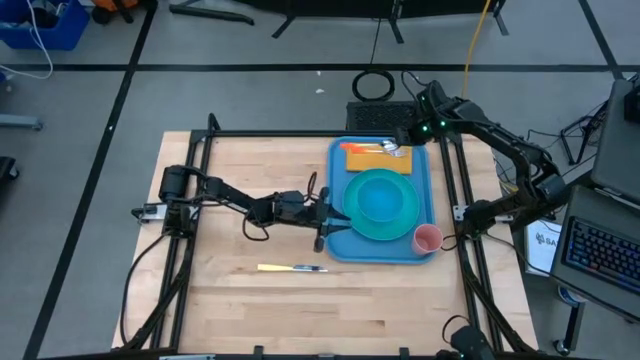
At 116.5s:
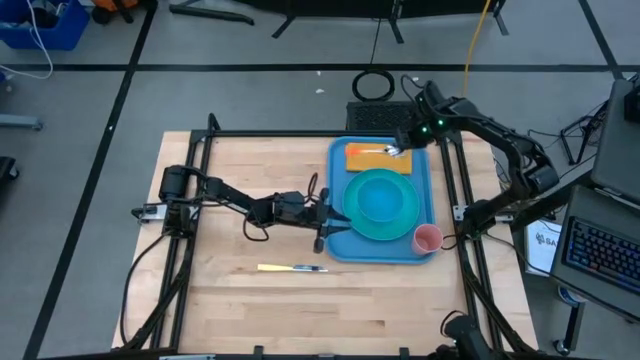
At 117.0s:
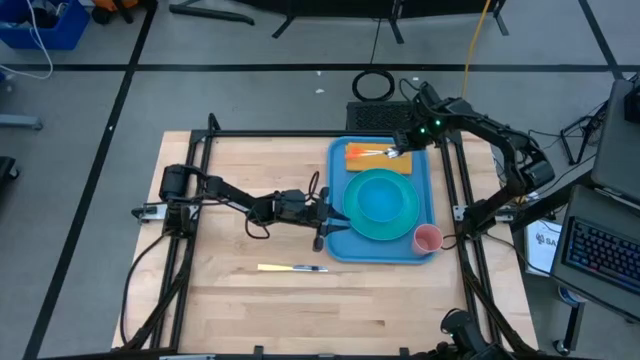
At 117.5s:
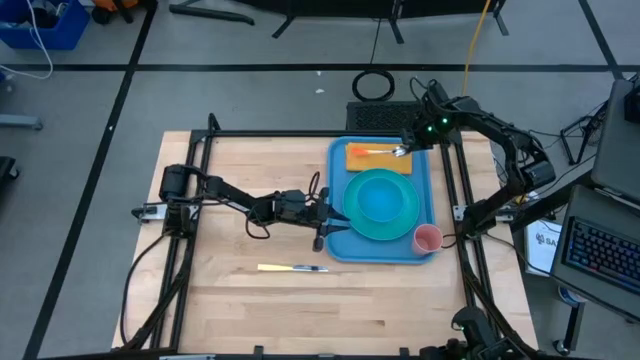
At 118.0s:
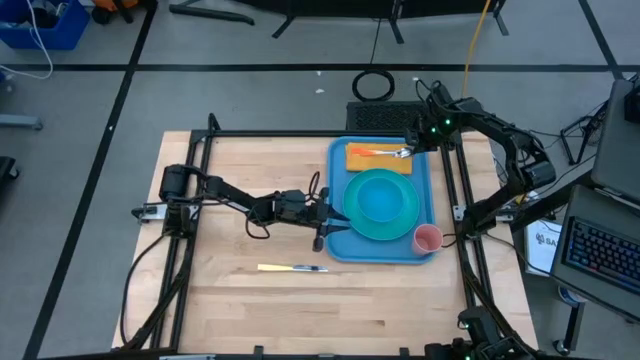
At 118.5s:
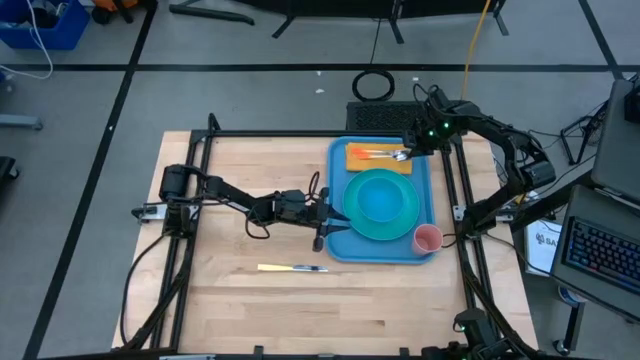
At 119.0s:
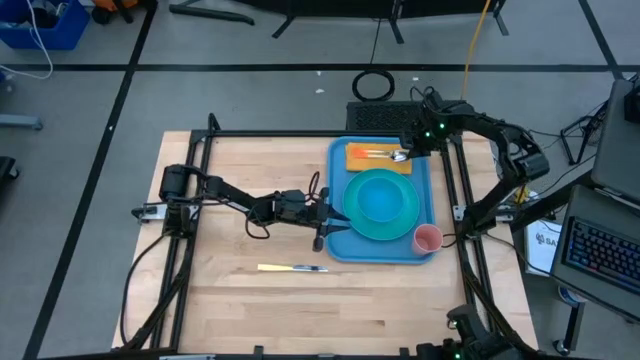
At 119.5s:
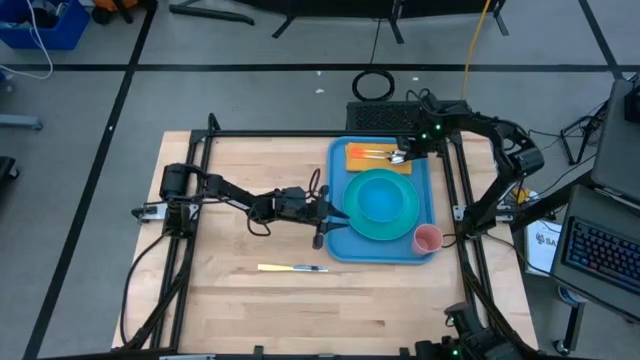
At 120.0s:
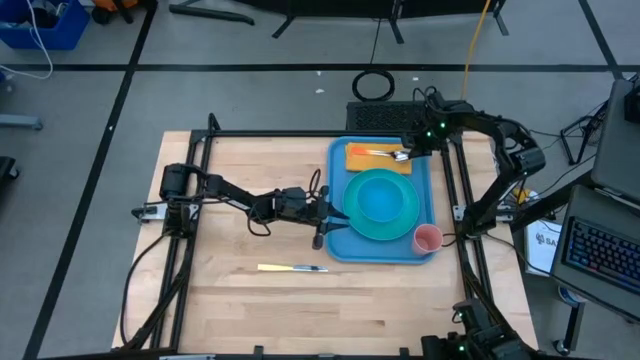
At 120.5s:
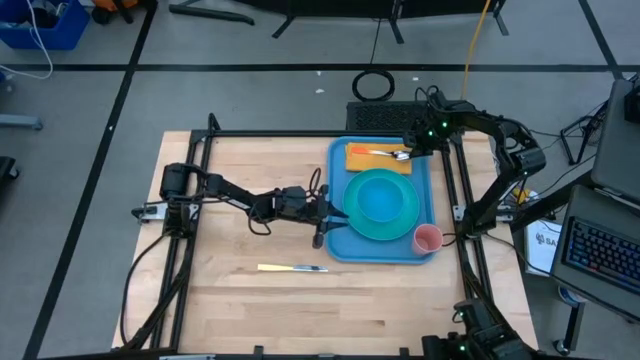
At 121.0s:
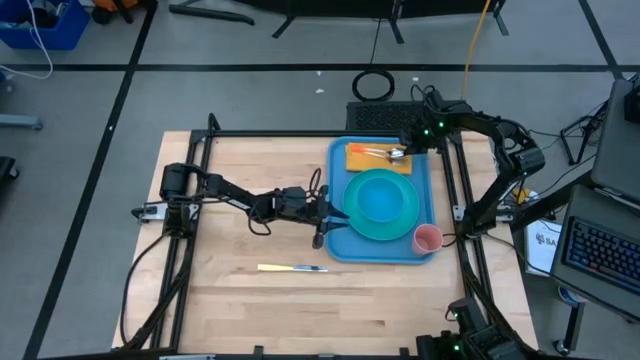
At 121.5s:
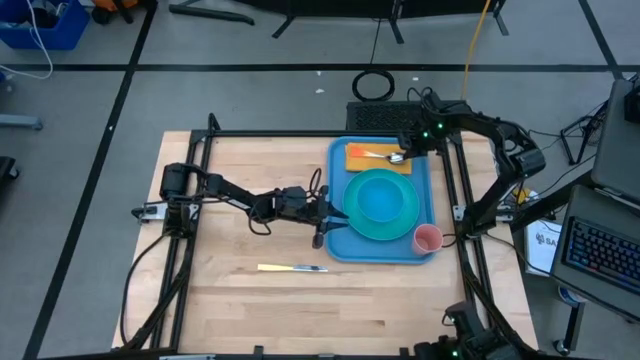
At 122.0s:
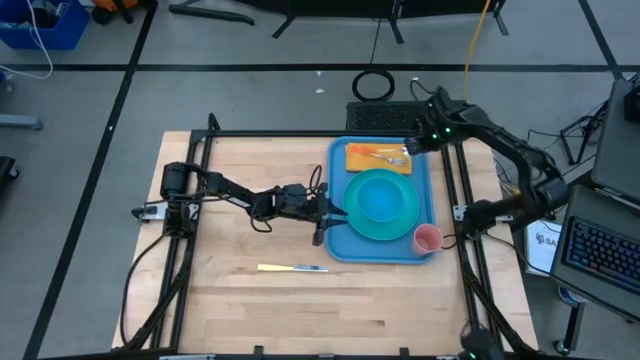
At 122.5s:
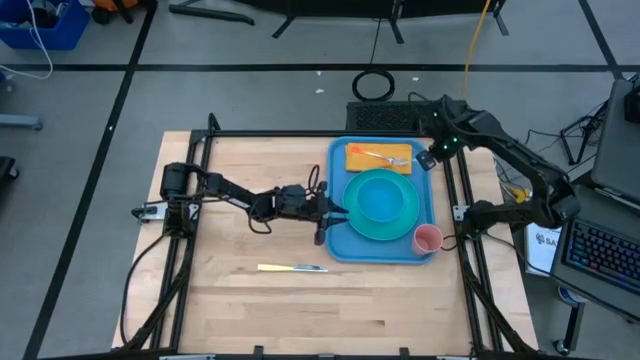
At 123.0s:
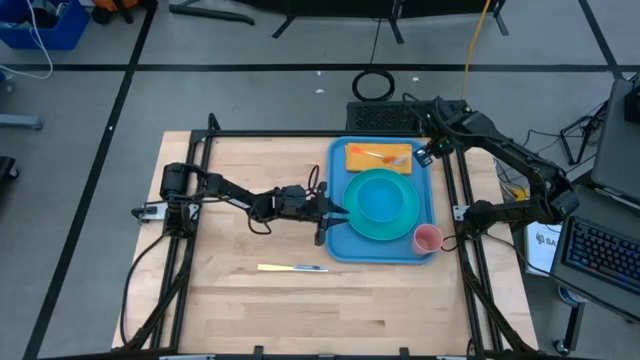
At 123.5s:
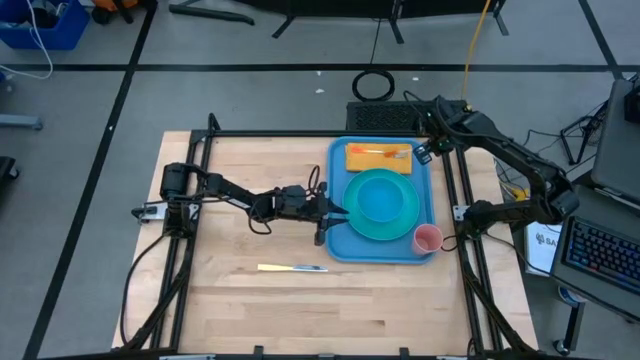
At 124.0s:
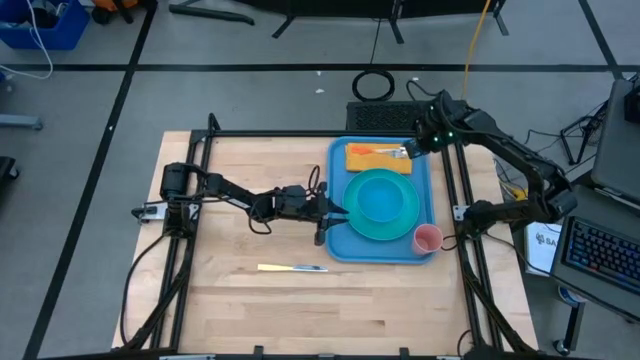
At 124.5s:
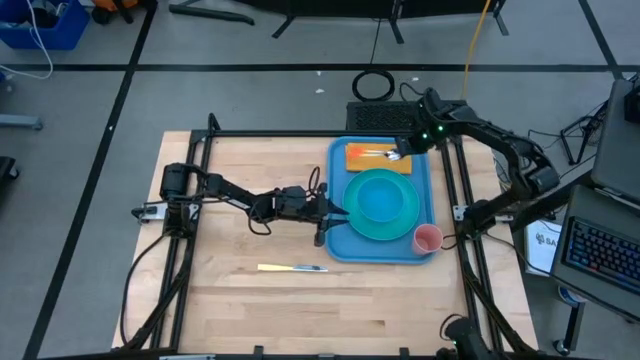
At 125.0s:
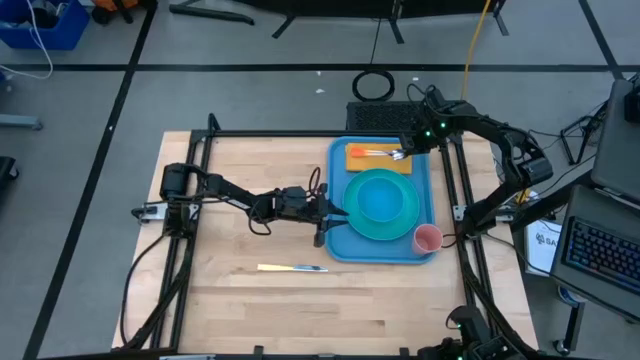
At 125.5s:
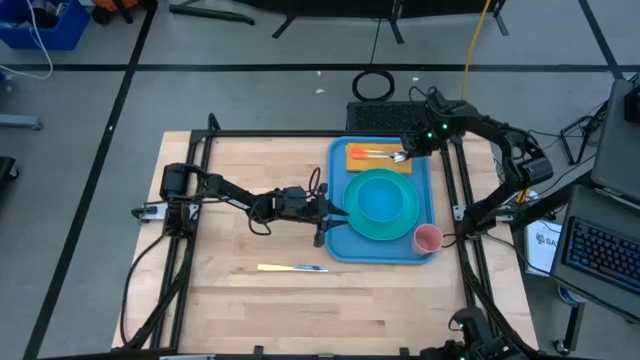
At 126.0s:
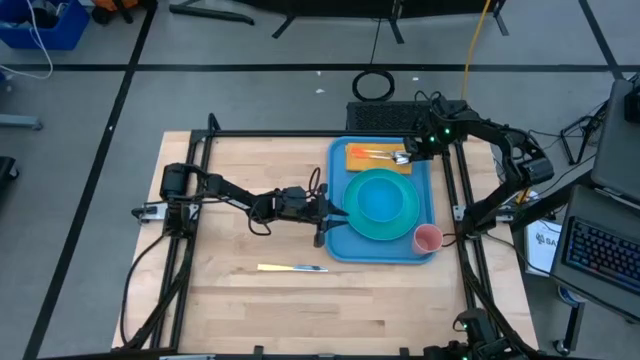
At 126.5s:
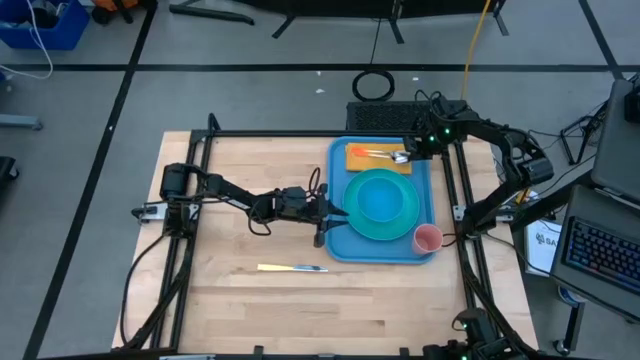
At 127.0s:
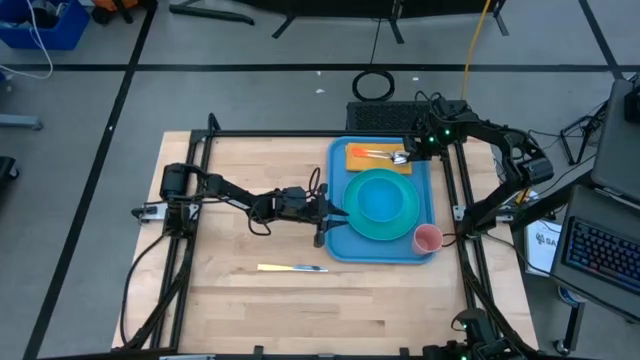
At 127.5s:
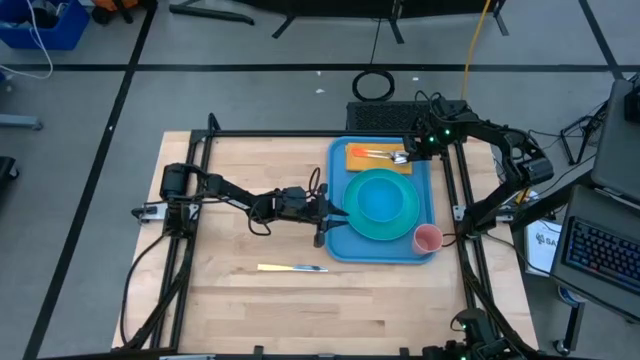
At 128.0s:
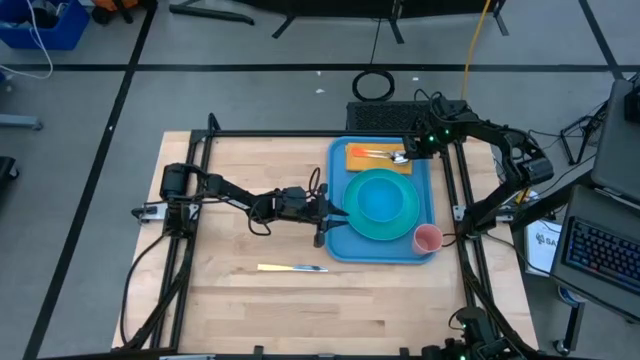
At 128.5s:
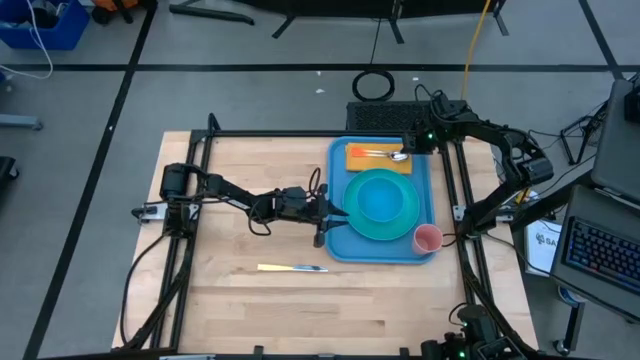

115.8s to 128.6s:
Task: Set up tray
Put the orange spoon to the right of the orange fork on the yellow table napkin on the blue serving tray

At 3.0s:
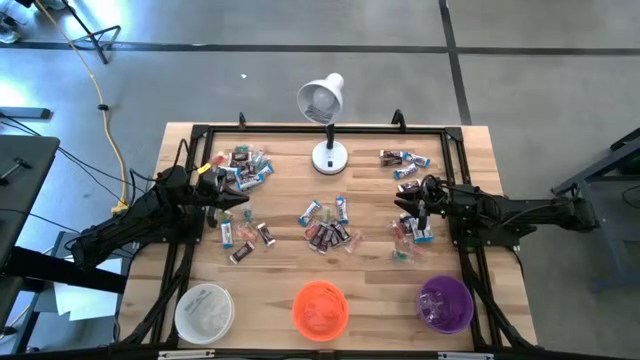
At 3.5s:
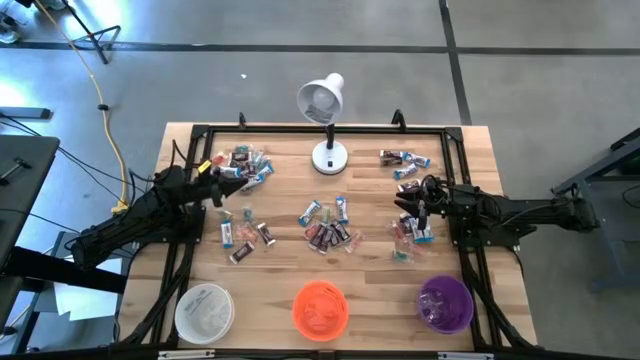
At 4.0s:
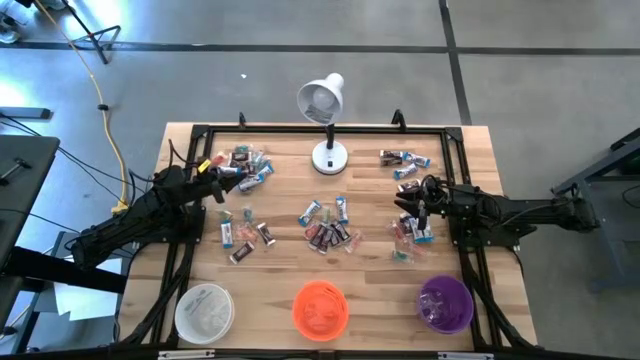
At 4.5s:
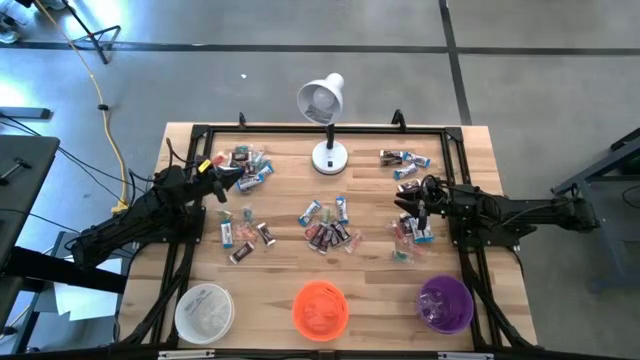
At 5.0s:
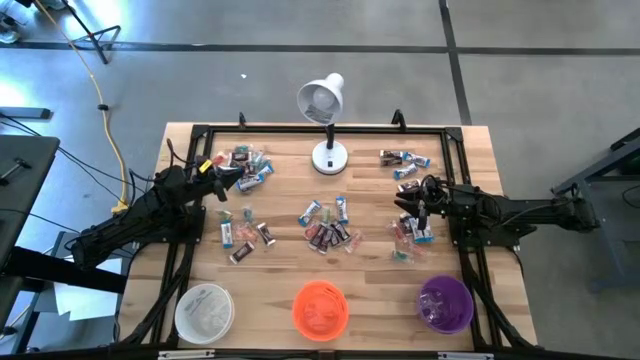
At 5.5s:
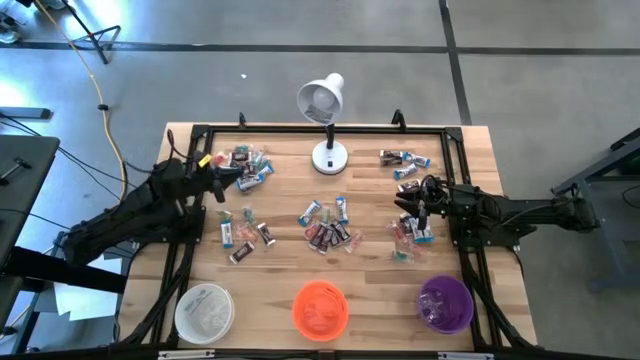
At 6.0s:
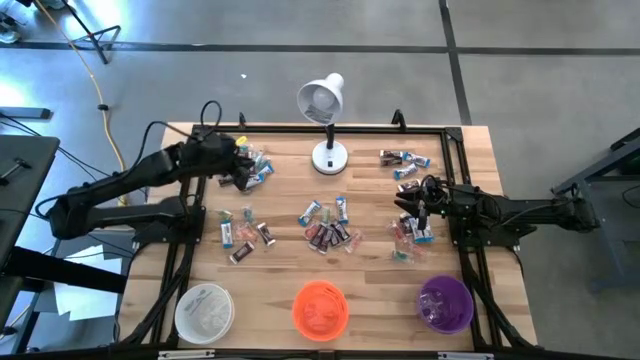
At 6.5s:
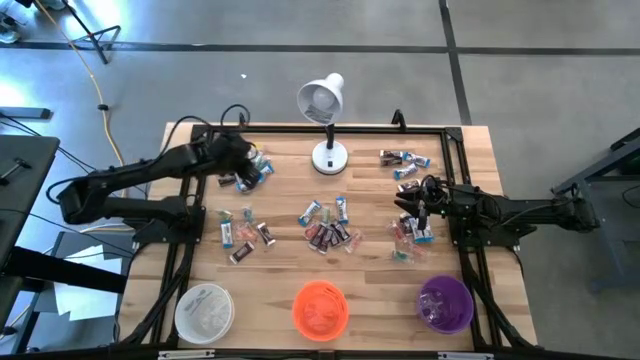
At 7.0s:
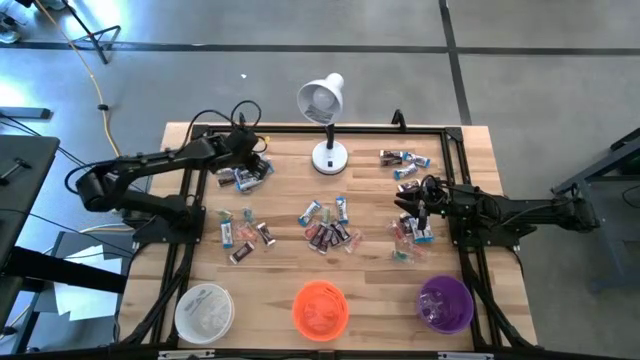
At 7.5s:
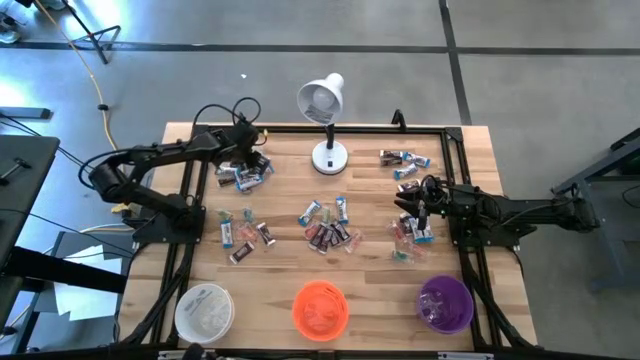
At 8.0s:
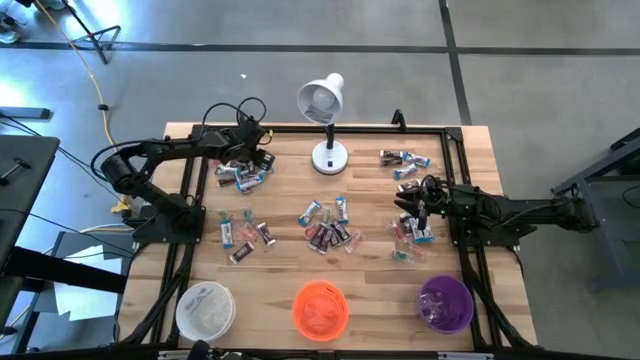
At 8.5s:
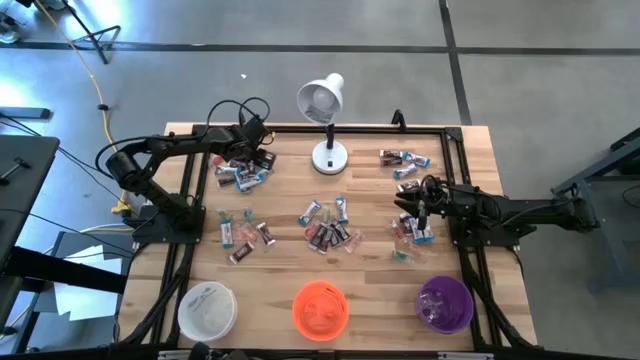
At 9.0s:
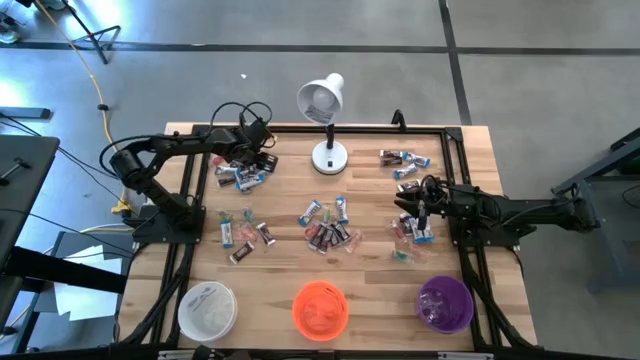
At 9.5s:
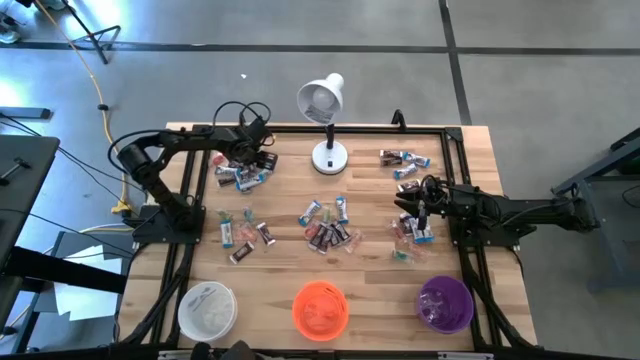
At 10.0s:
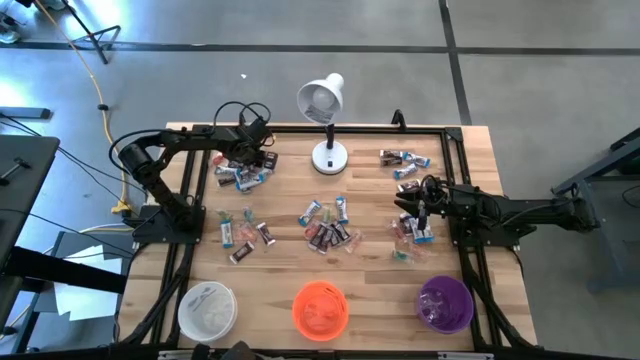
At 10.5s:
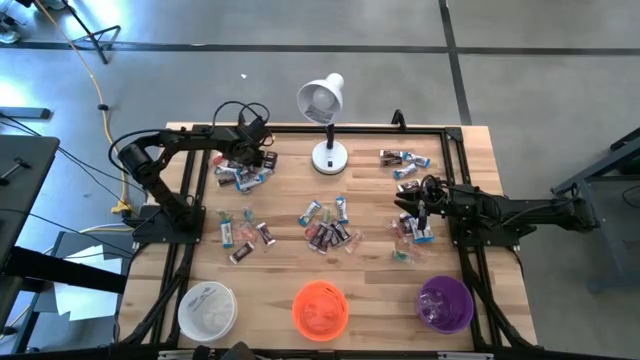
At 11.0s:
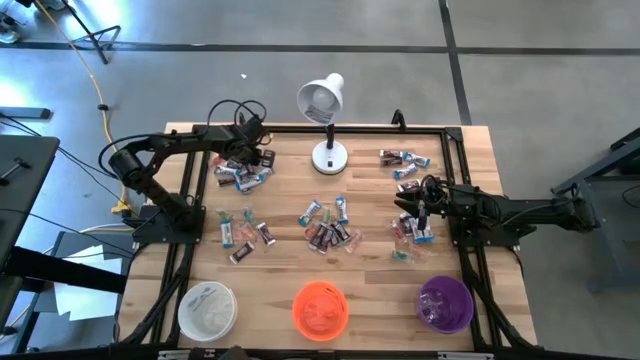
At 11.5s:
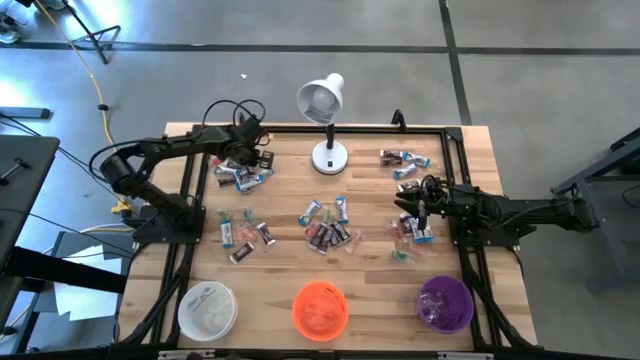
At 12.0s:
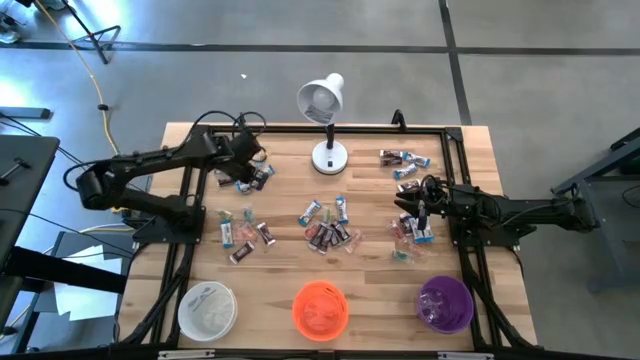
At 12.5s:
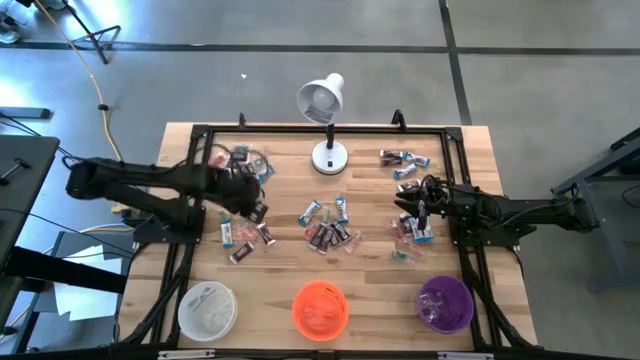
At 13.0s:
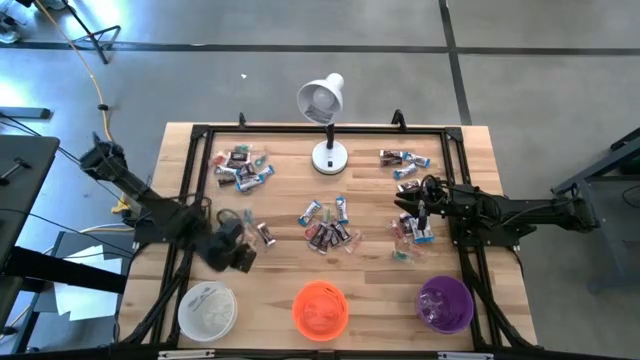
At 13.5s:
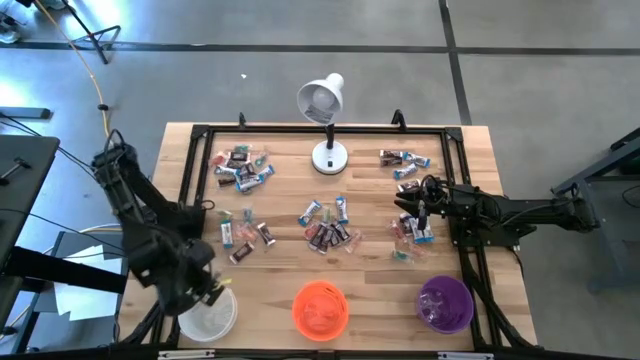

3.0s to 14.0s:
Task: Organize candy in baskets
Put the blue gummy into the white bucket
